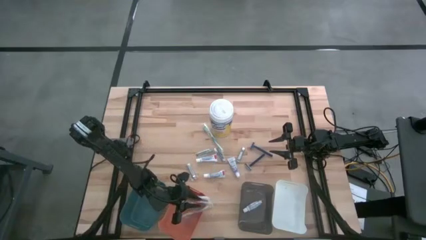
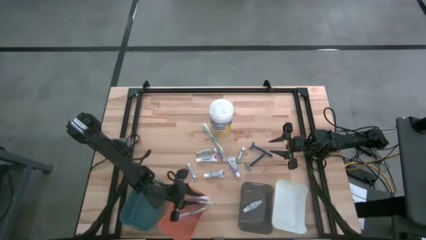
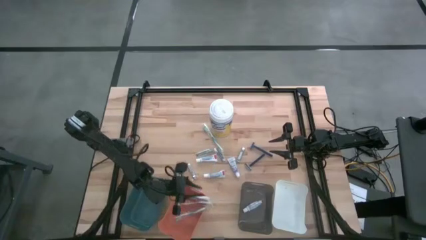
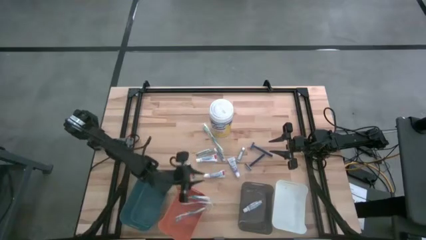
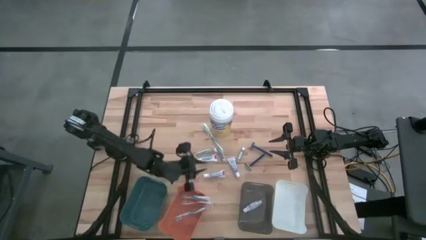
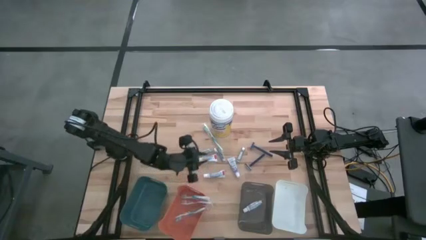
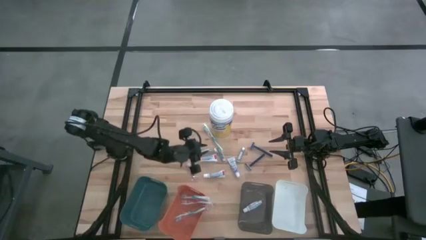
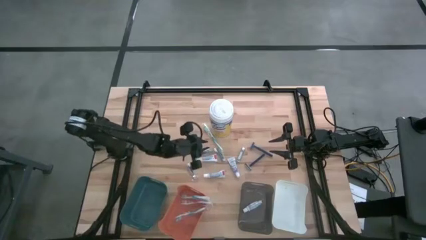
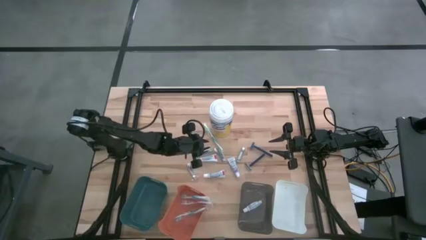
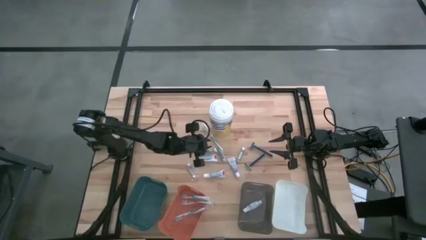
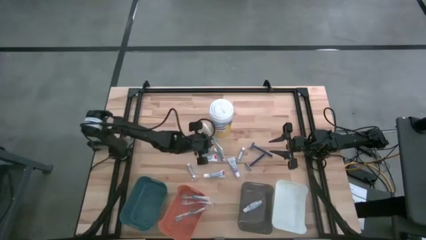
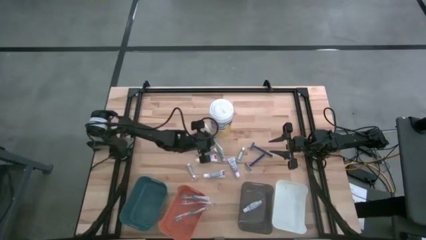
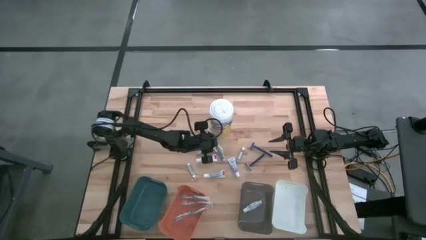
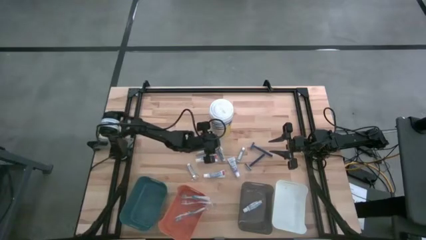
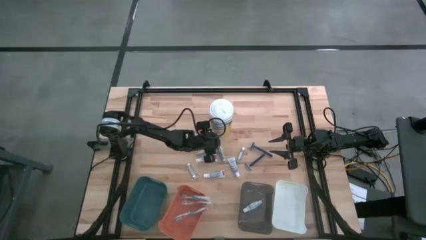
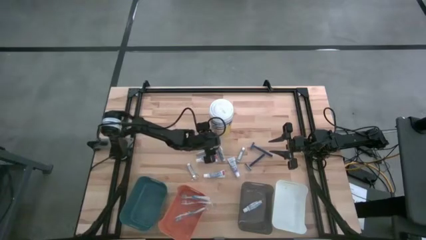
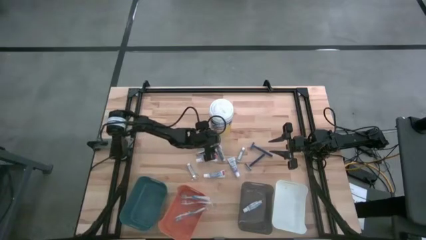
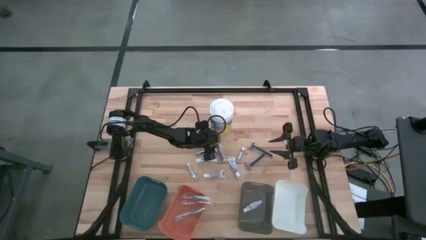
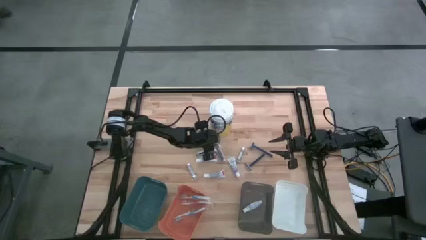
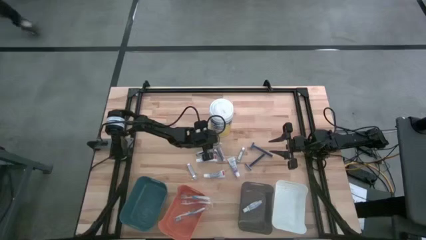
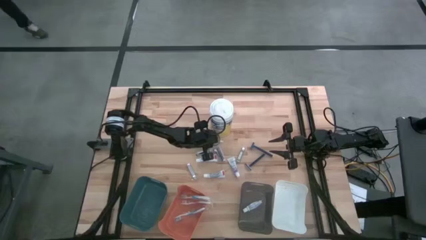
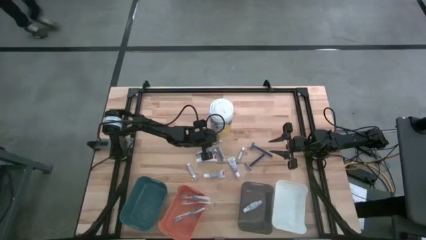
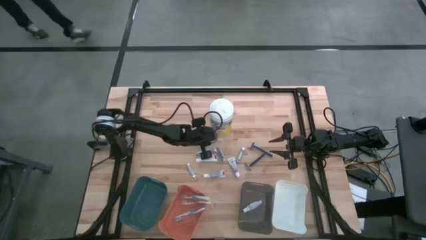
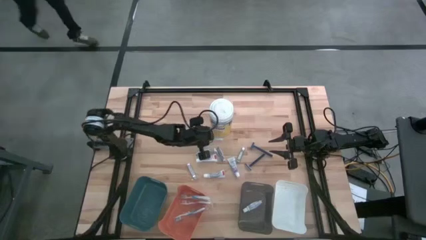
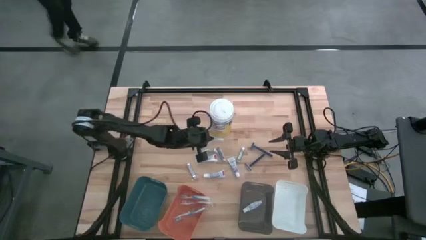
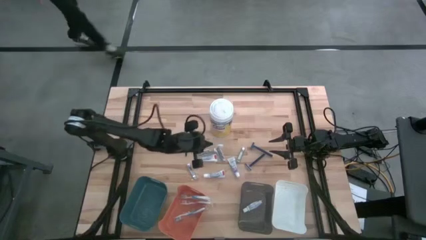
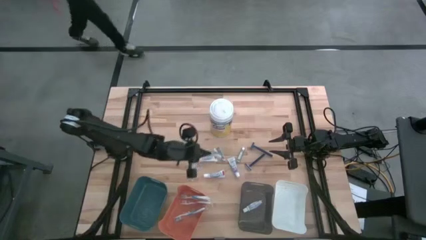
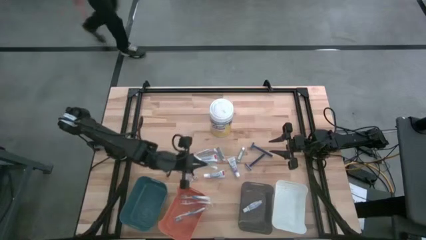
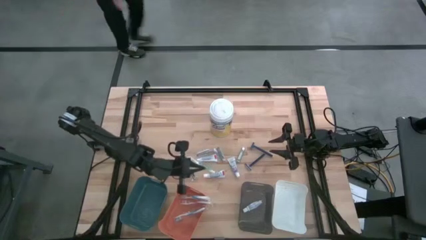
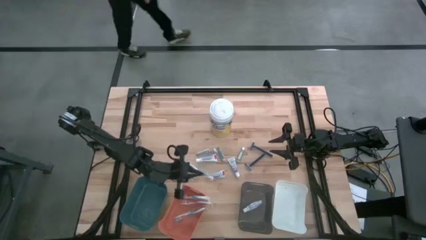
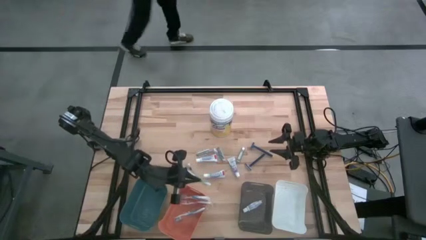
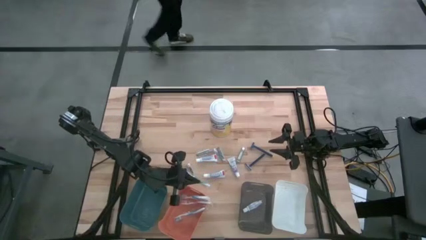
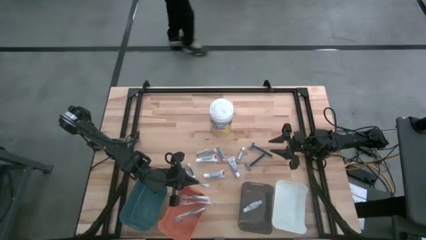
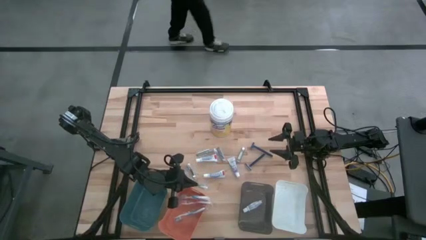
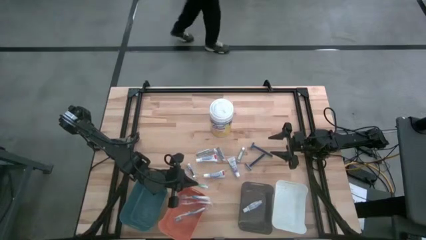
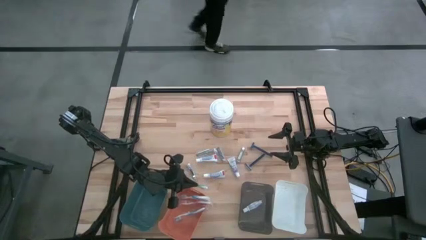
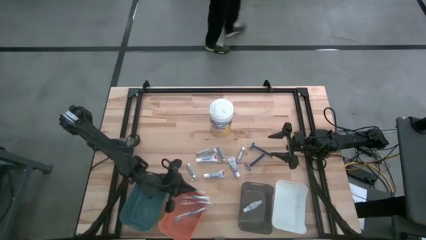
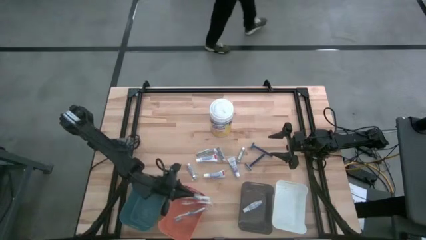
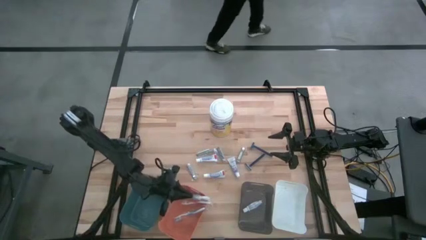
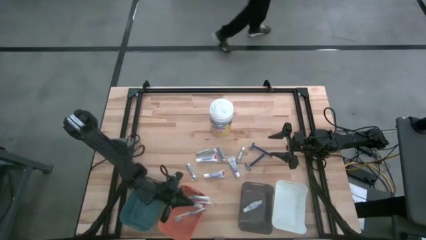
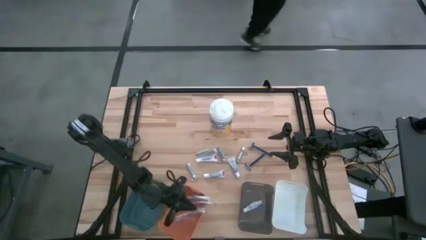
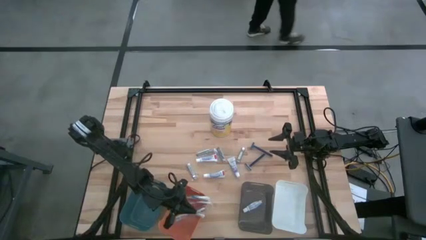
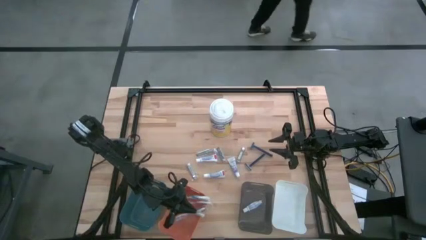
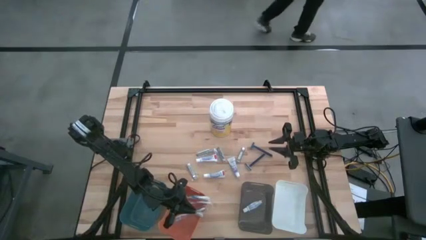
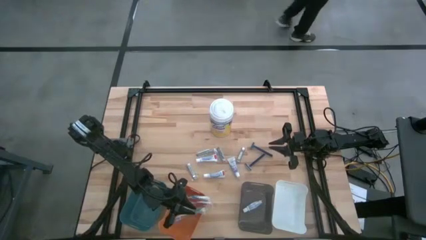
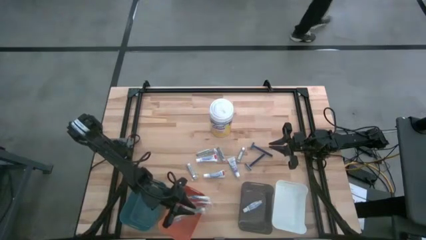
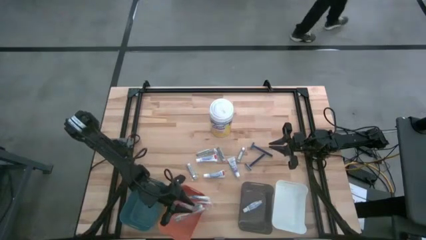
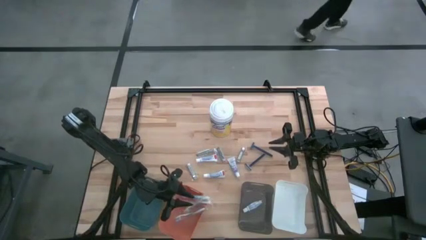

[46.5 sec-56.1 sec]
Task: Pick & Place Travel size toiletries
Put the green toothbrush into the orange bin

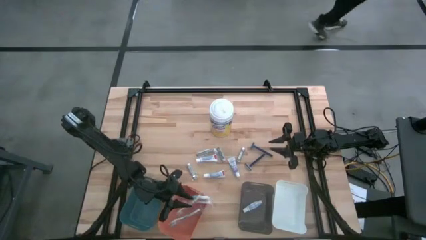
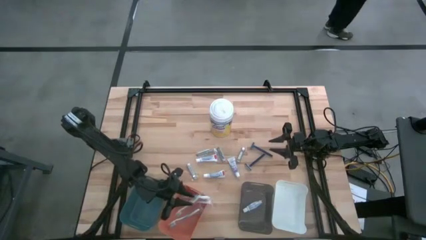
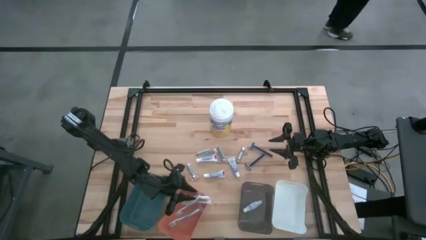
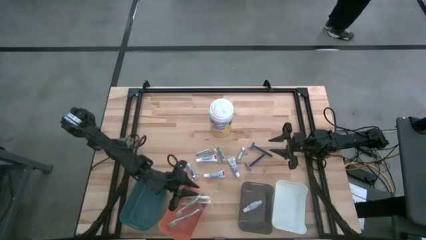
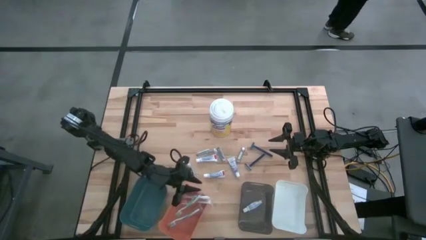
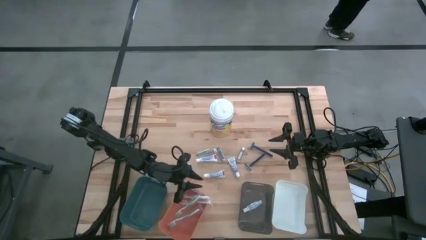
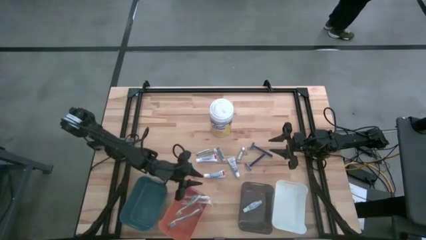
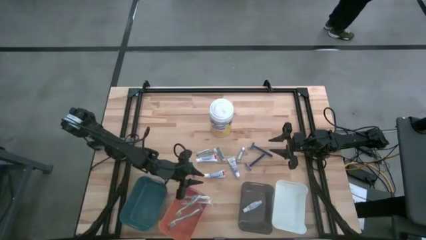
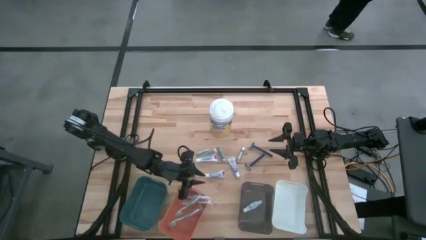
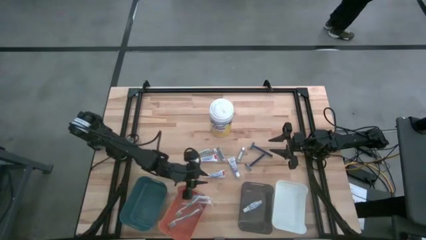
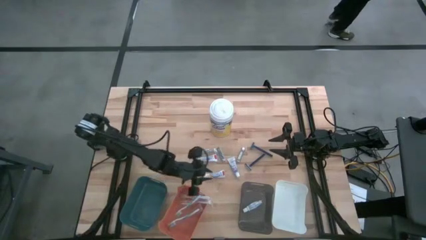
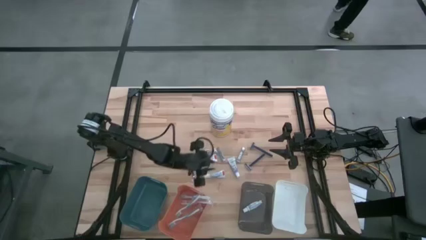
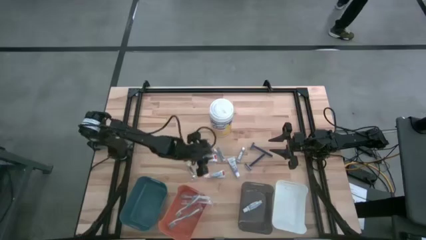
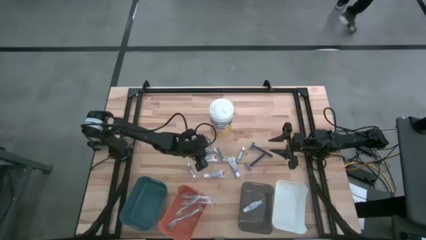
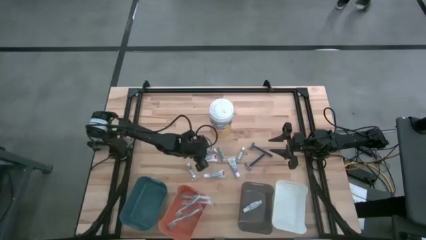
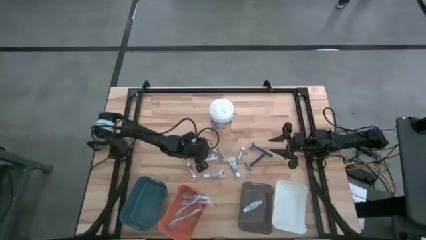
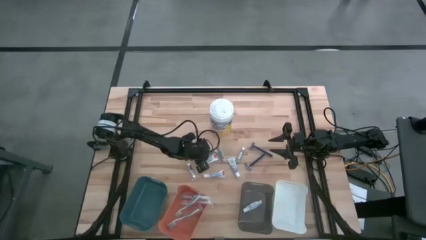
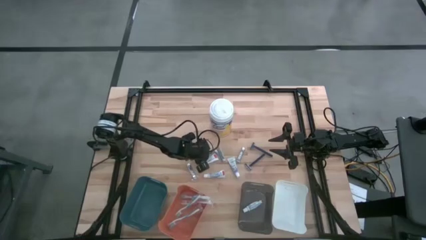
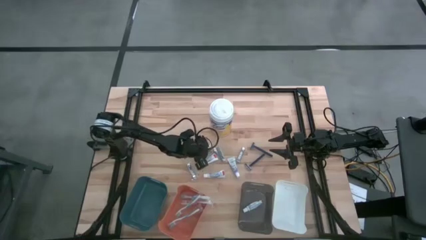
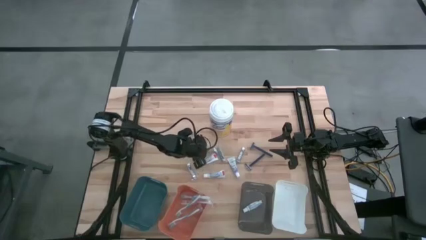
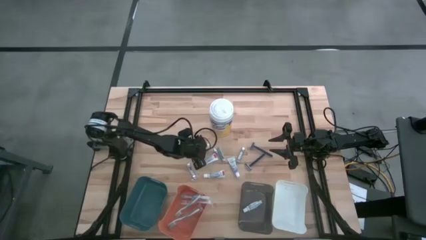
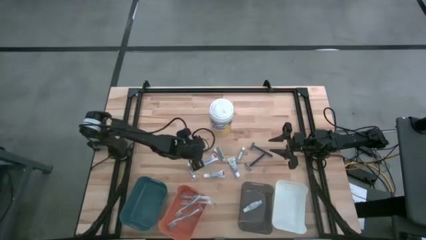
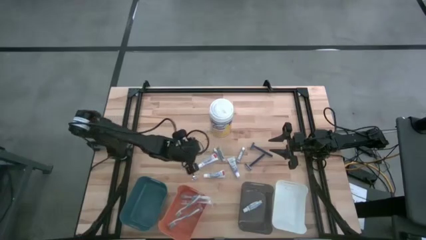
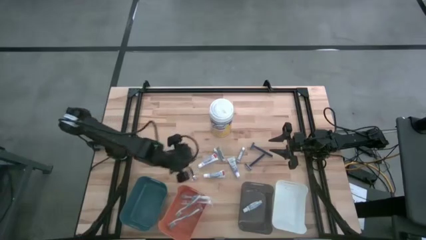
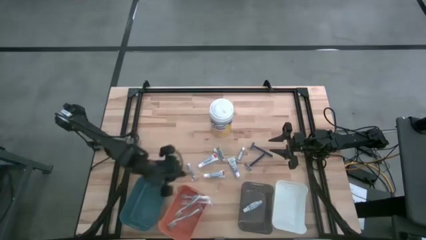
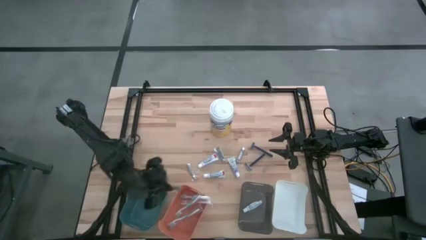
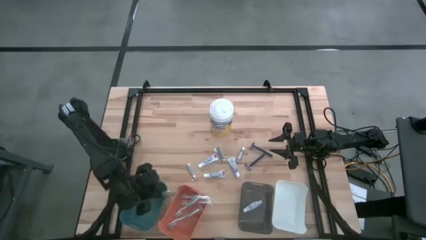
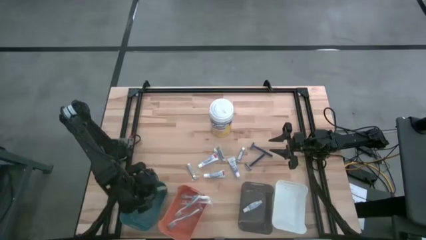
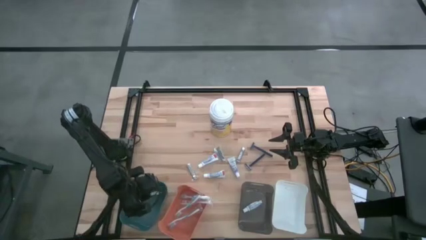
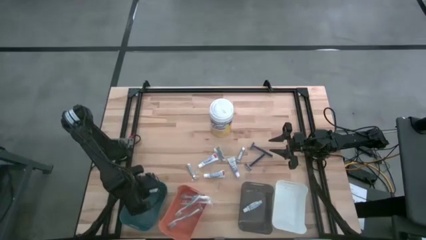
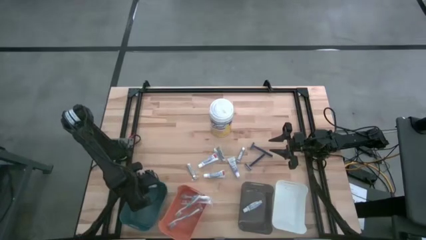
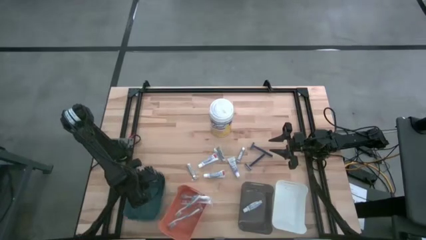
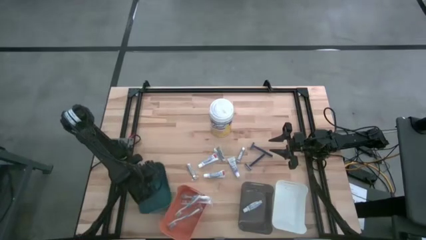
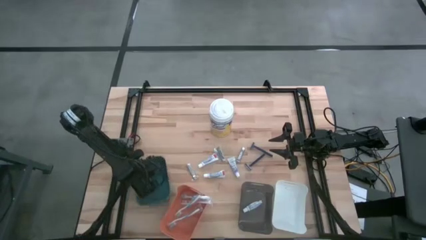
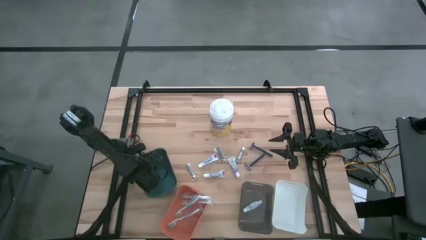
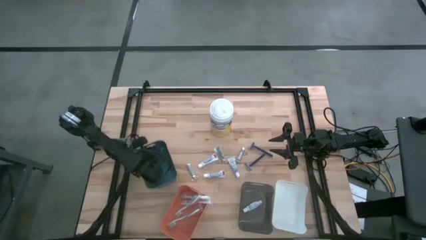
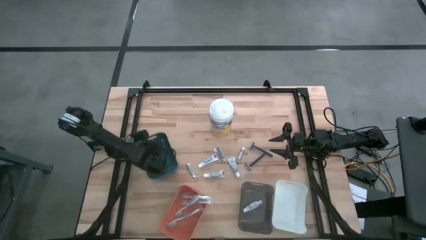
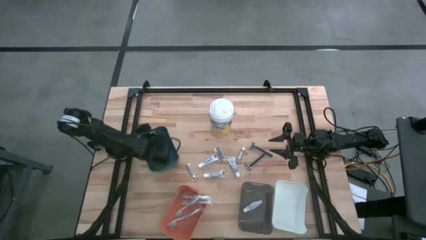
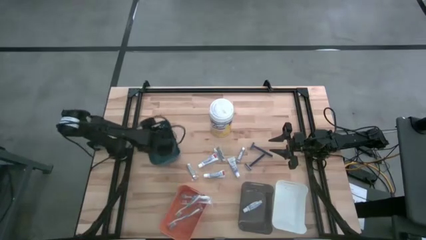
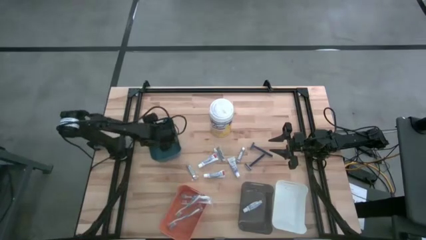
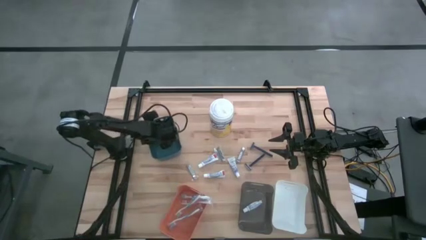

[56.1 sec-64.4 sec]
Put the silver nail cutter into the blue bin
